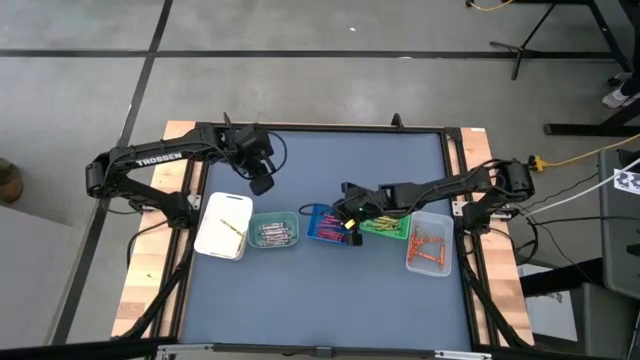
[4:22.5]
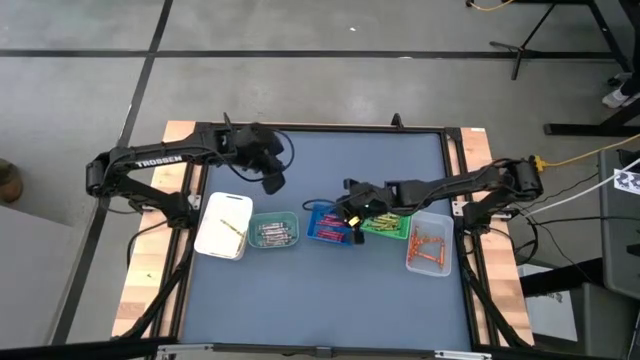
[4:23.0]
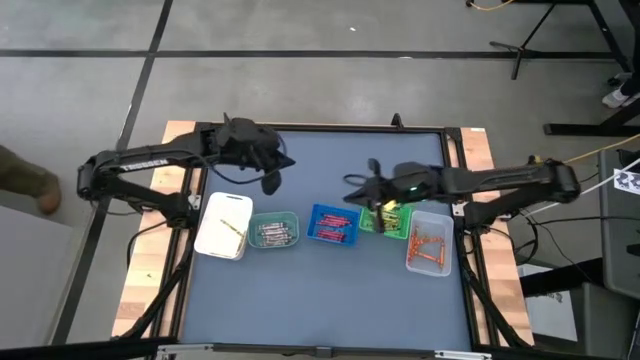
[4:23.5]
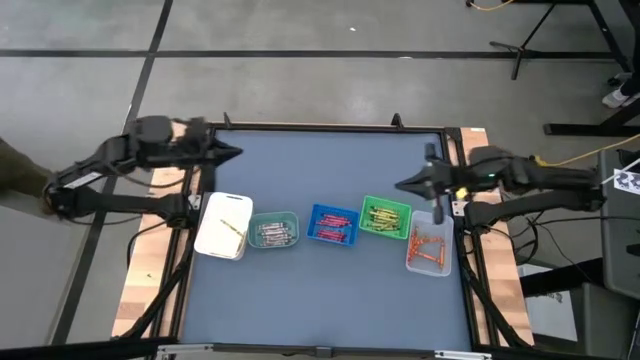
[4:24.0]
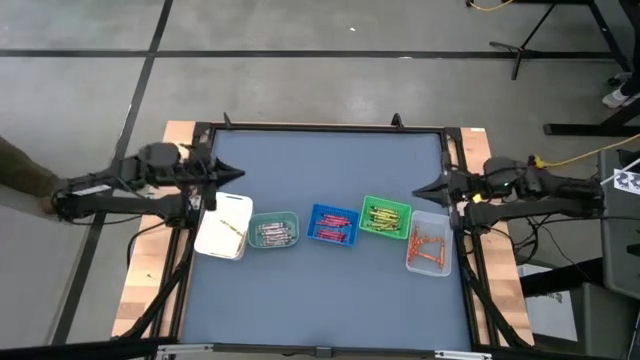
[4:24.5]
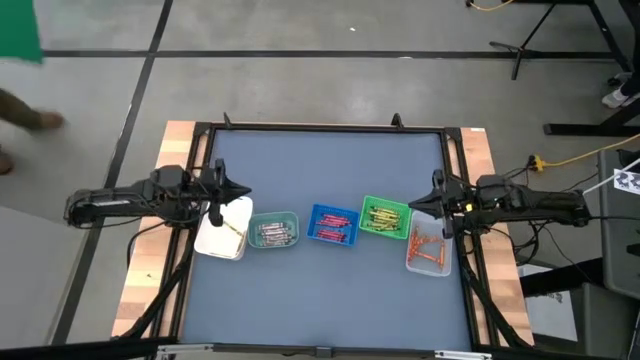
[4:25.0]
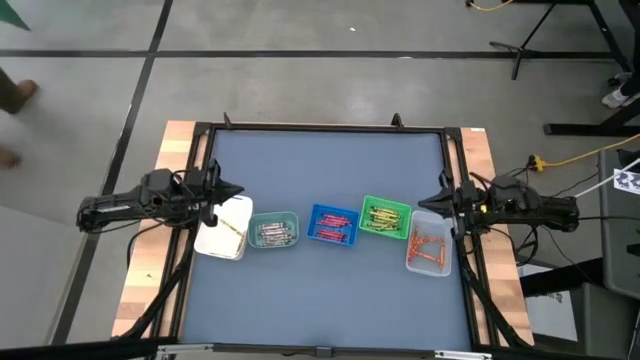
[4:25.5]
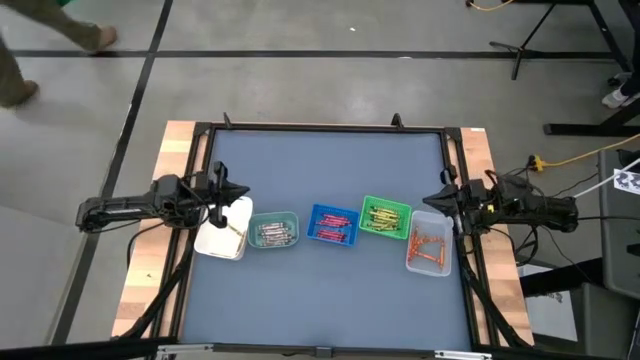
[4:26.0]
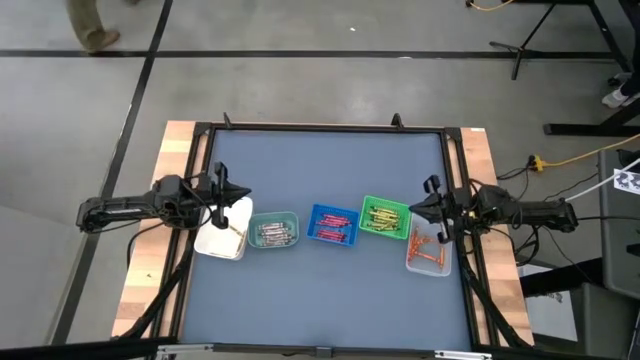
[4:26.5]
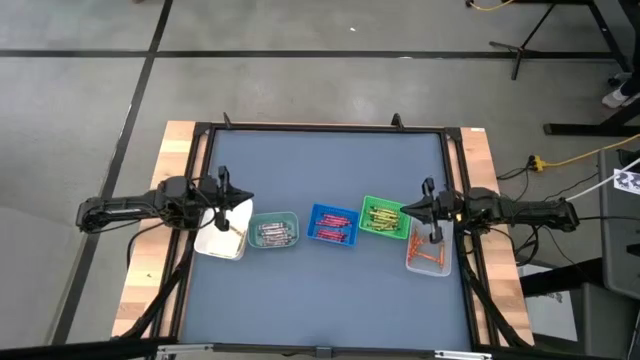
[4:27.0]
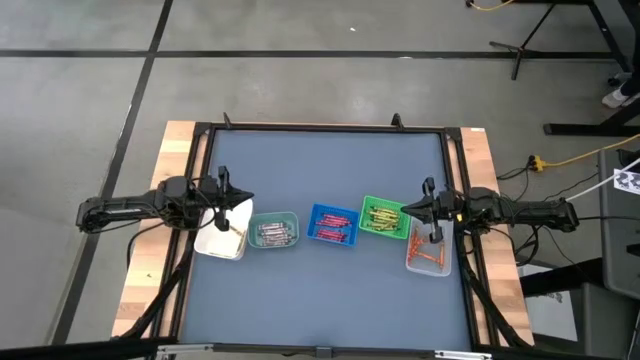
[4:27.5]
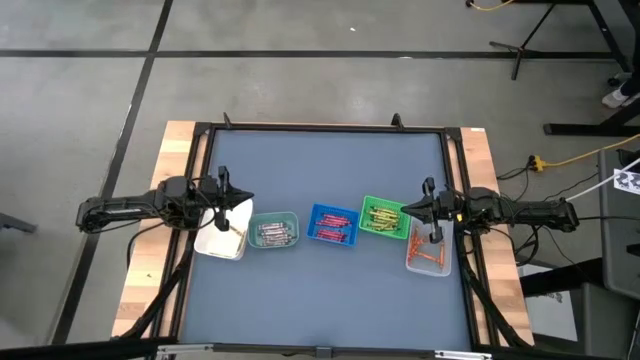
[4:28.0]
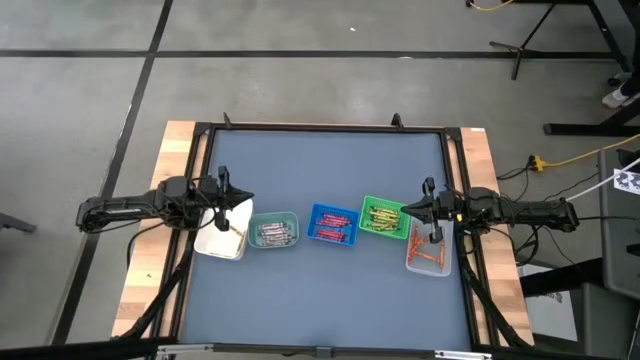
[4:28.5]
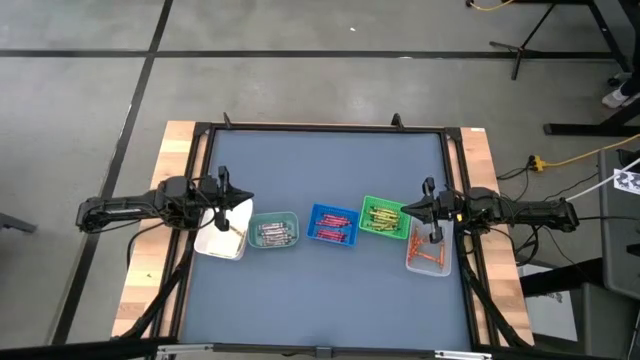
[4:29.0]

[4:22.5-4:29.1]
Task: Sort crayons
Return to Home Position

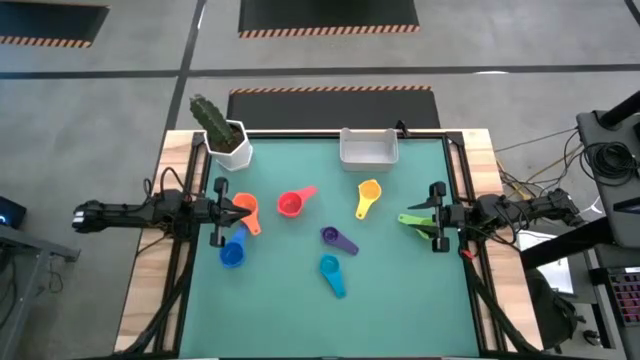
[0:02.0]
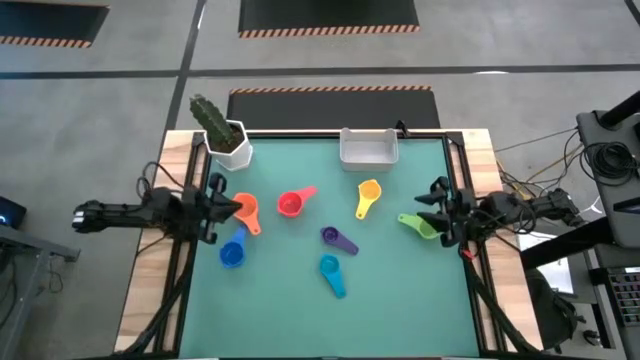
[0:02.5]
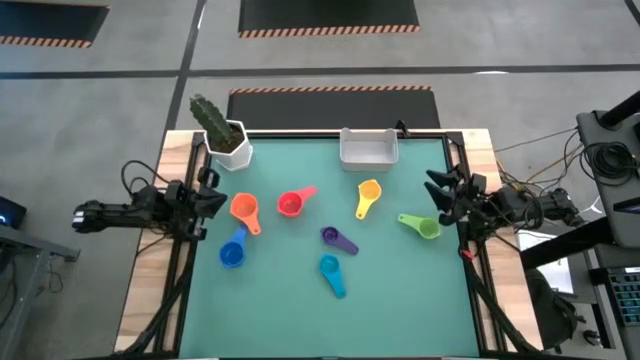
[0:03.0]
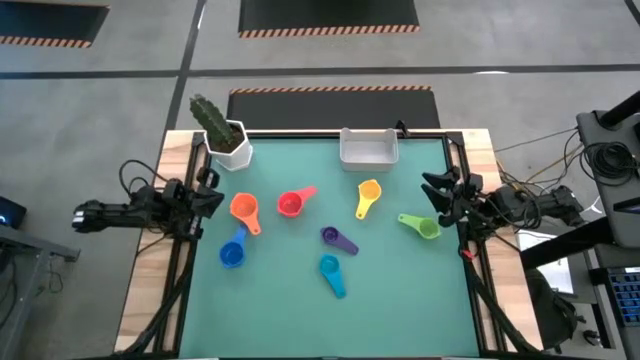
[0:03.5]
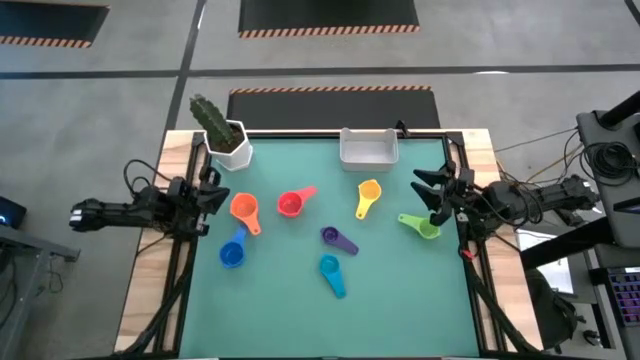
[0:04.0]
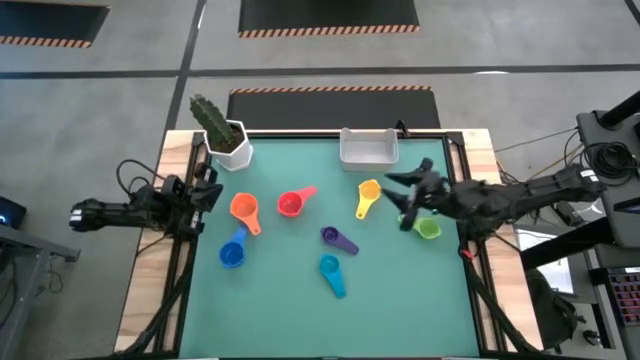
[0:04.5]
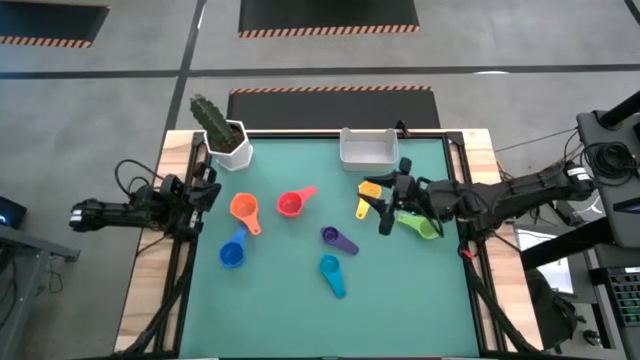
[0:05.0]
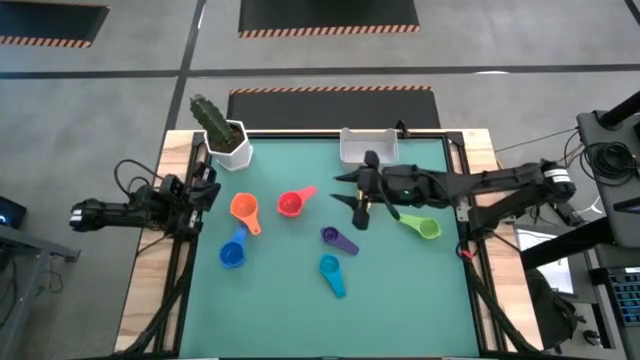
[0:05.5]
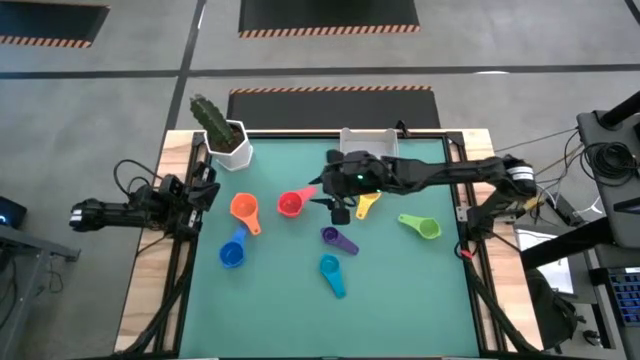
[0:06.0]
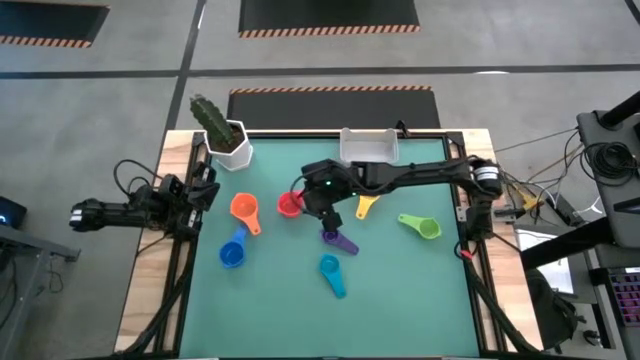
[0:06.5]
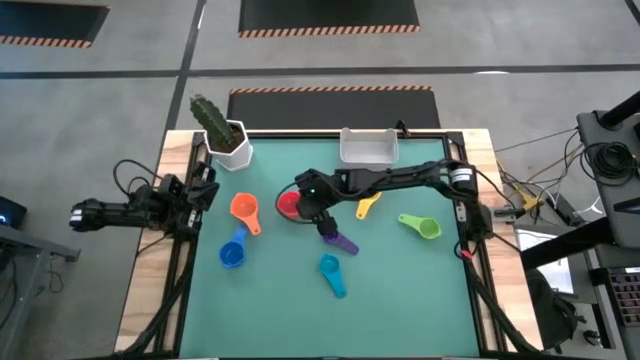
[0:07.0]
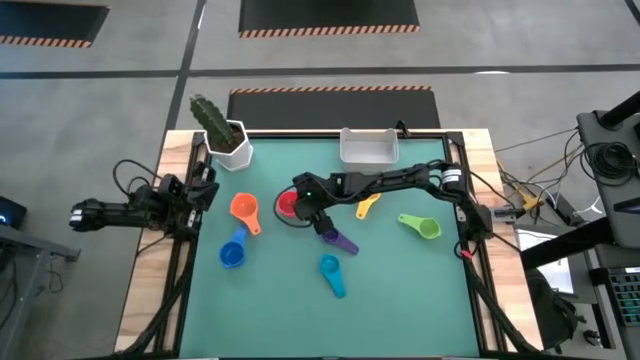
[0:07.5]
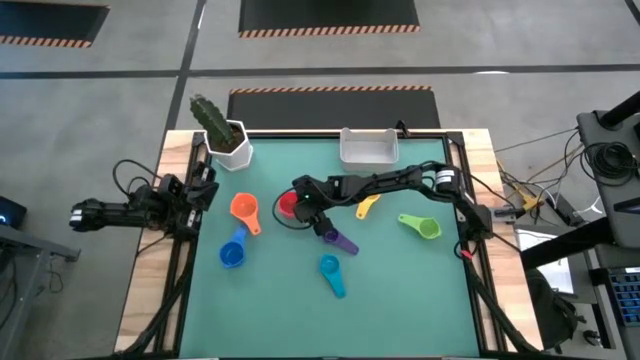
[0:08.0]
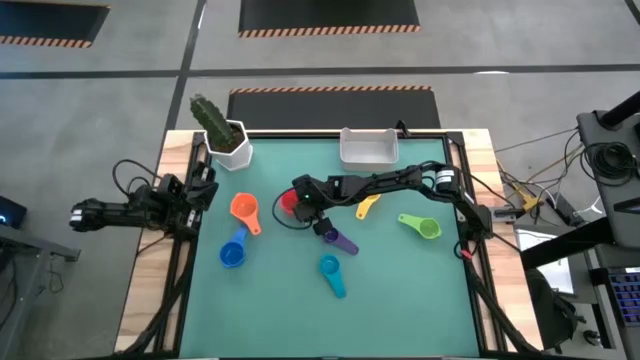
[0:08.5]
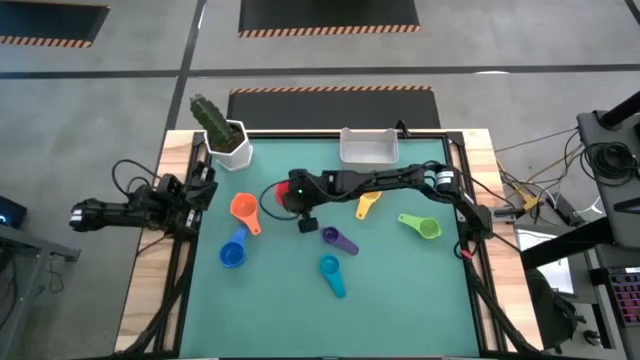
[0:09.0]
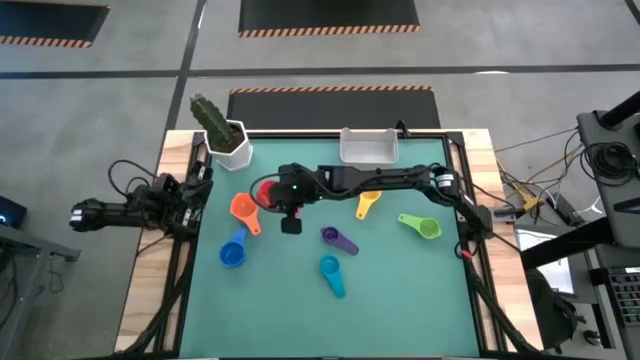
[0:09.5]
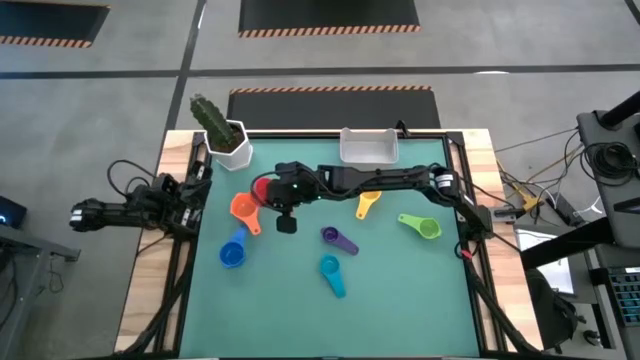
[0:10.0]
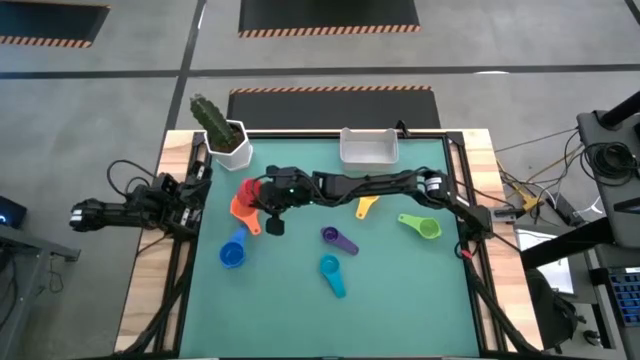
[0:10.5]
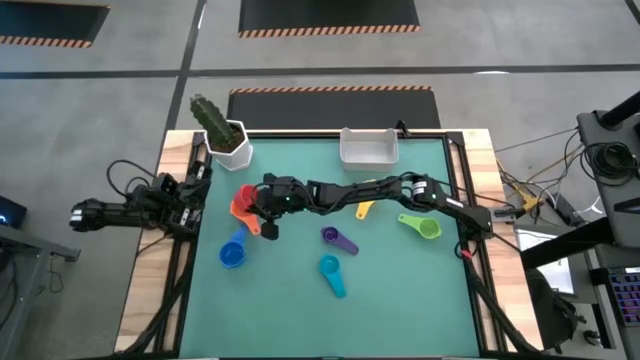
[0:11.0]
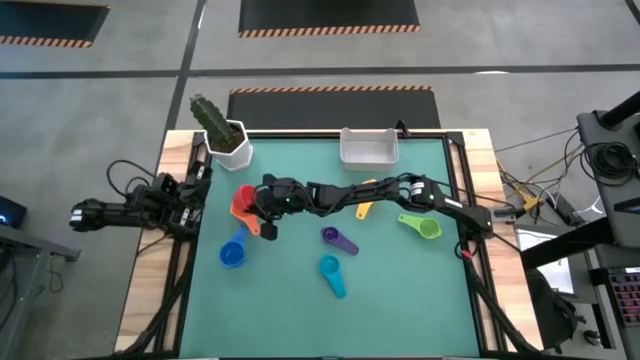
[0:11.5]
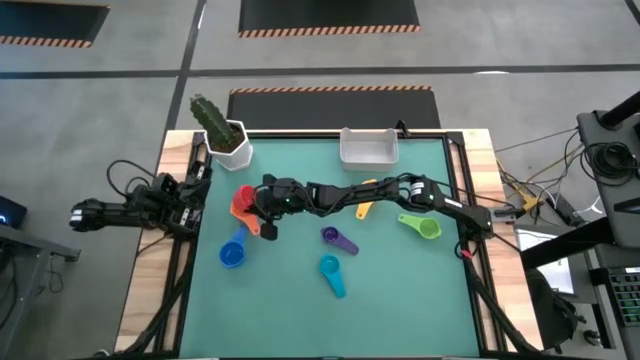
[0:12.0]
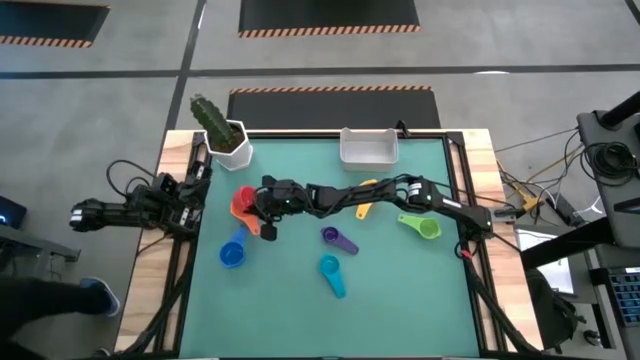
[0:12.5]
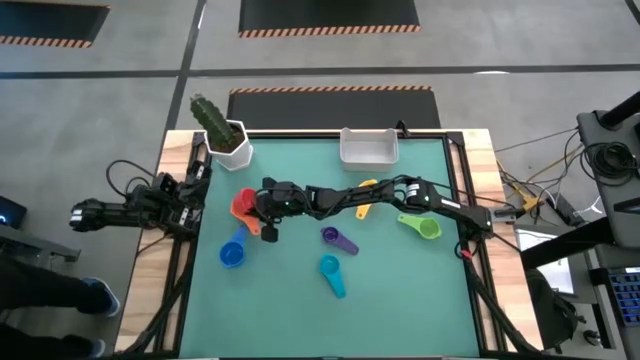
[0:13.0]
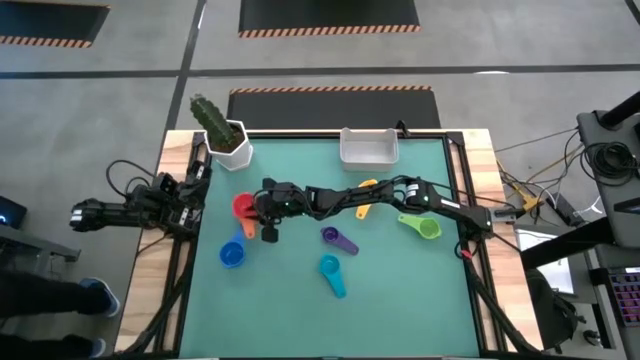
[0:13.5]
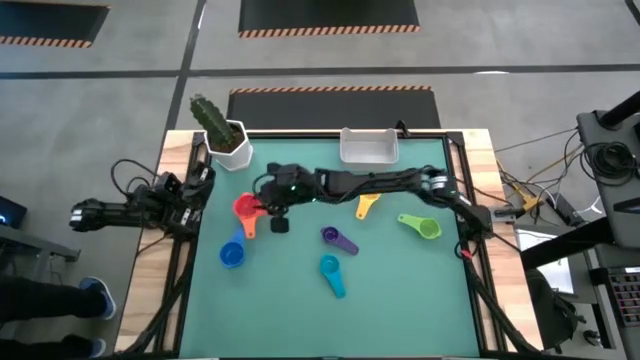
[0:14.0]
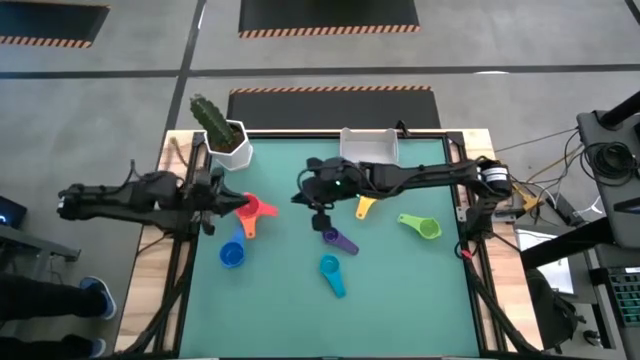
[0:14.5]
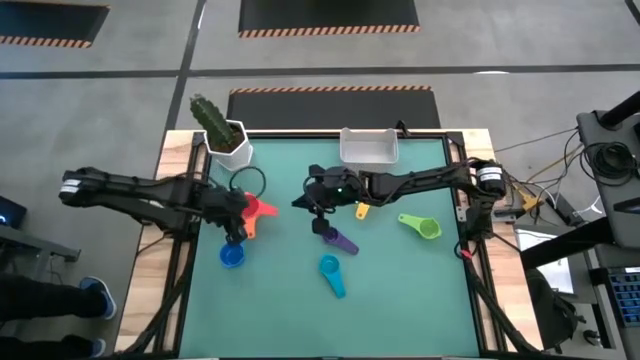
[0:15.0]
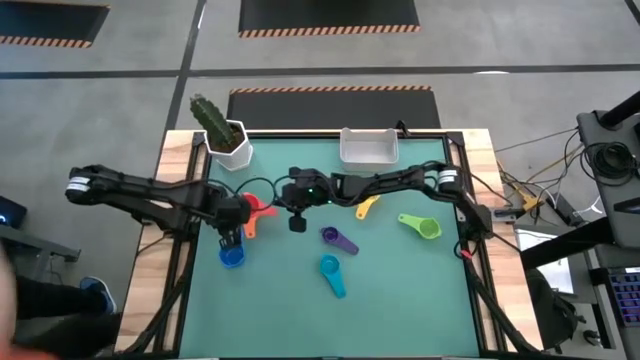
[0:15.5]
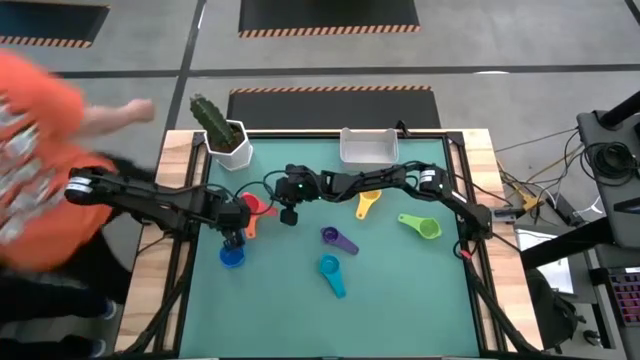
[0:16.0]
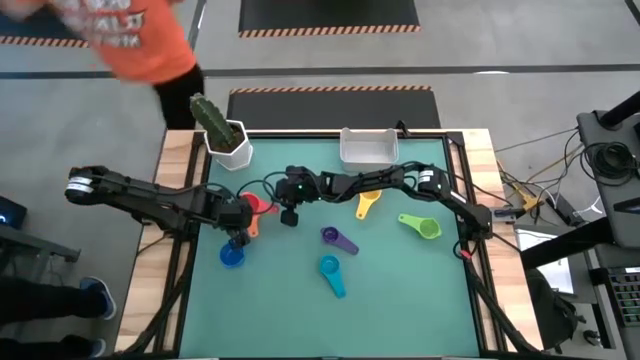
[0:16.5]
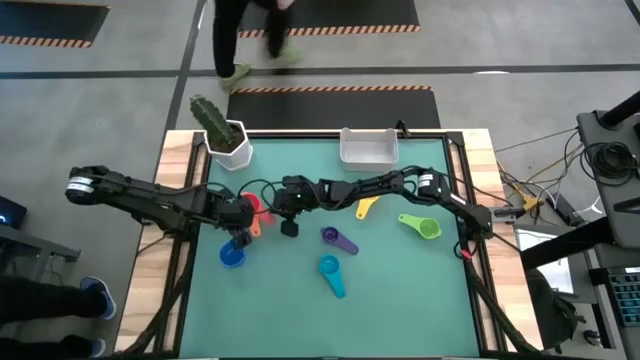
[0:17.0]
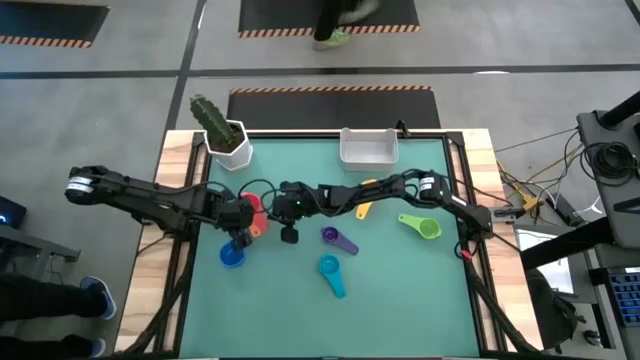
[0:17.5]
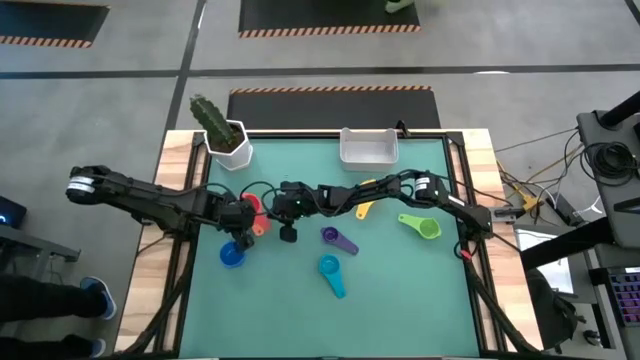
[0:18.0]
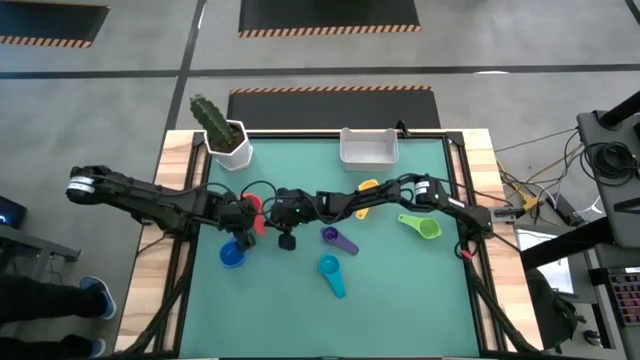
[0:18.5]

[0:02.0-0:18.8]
Task: Nest measuring cups in basket
Stack the red measuring cup on top of the orange measuring cup
